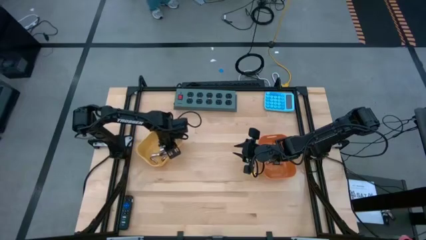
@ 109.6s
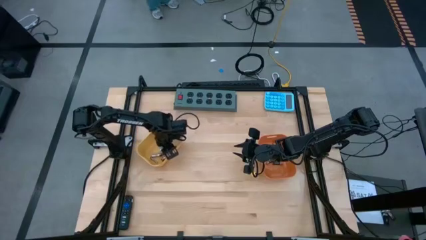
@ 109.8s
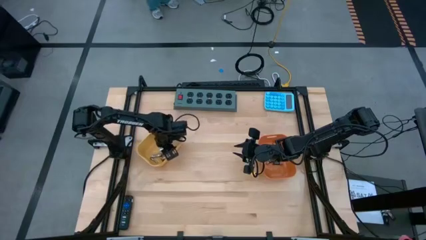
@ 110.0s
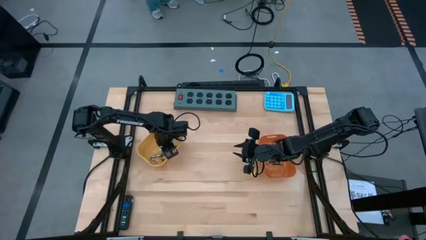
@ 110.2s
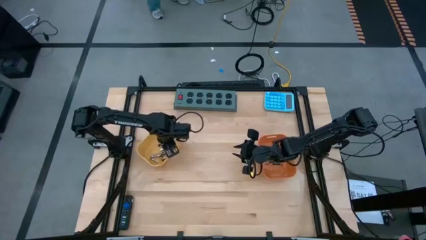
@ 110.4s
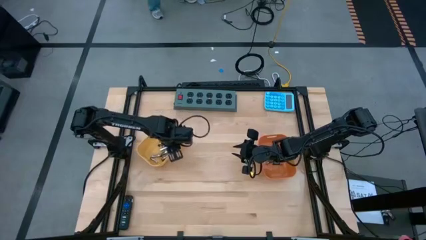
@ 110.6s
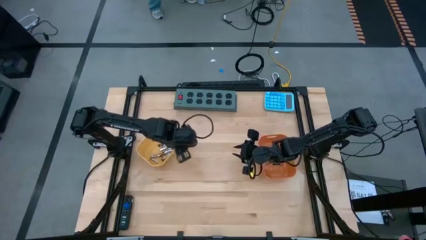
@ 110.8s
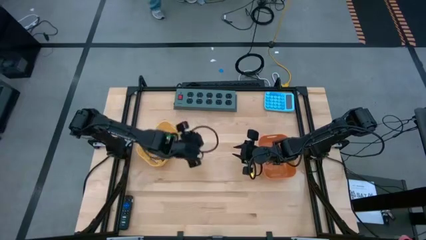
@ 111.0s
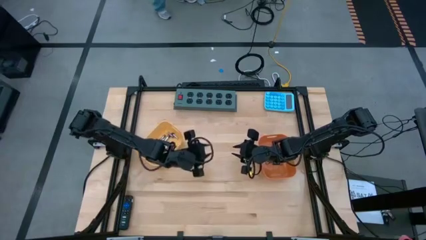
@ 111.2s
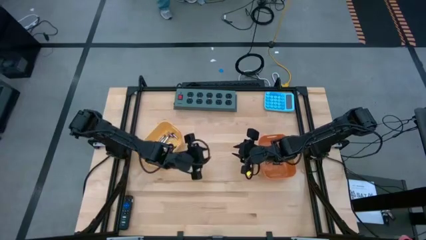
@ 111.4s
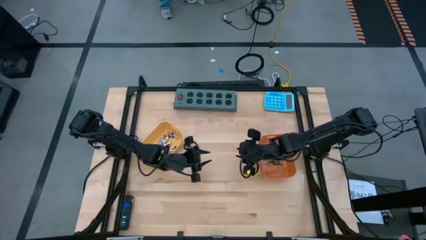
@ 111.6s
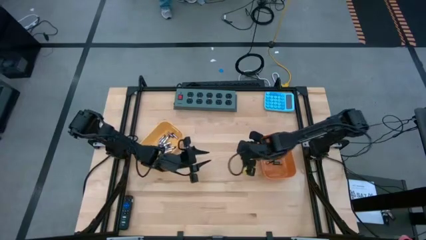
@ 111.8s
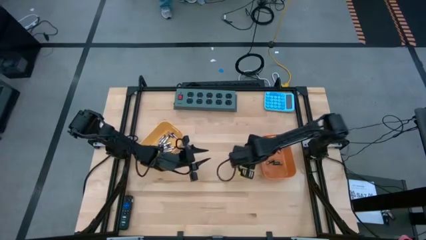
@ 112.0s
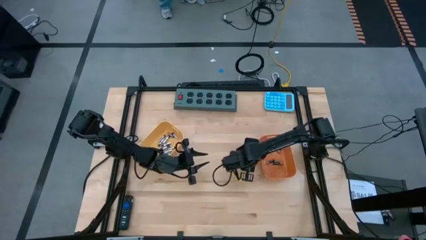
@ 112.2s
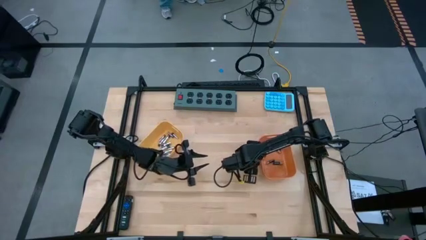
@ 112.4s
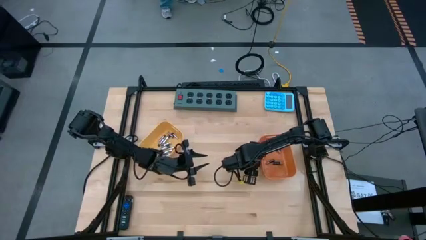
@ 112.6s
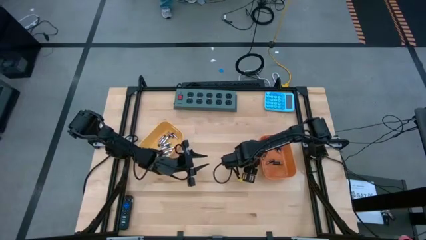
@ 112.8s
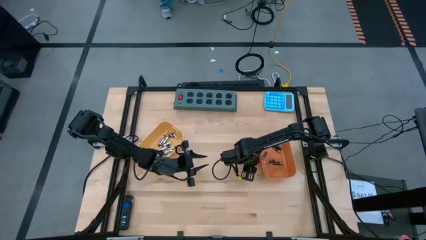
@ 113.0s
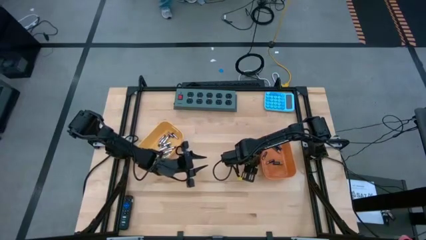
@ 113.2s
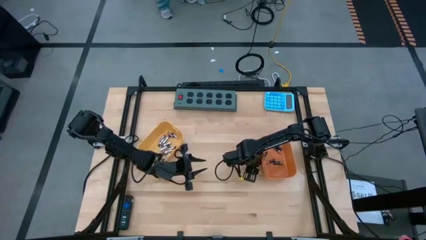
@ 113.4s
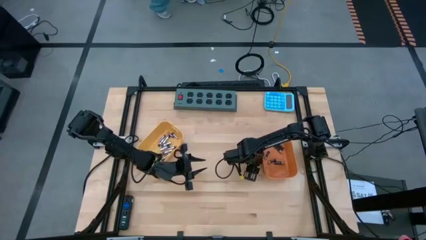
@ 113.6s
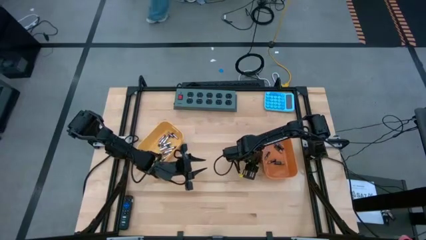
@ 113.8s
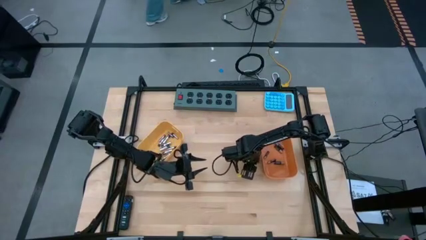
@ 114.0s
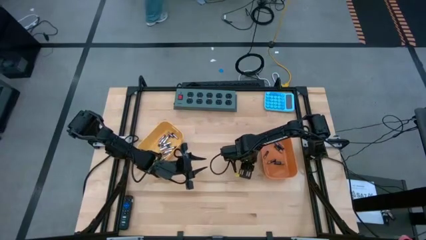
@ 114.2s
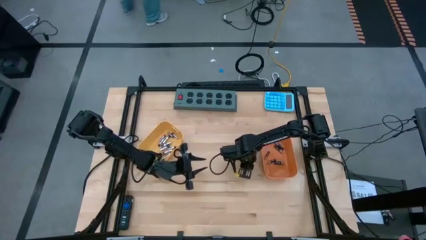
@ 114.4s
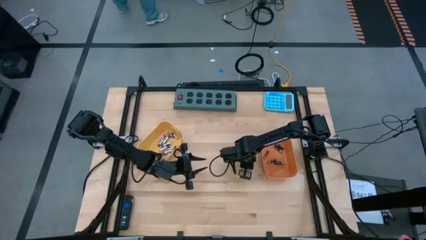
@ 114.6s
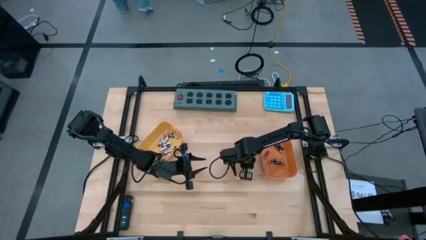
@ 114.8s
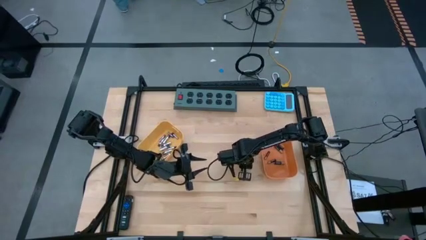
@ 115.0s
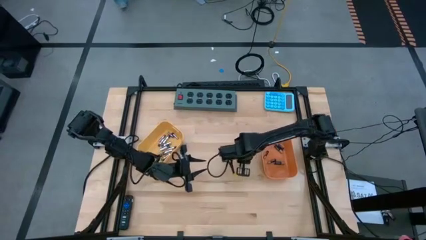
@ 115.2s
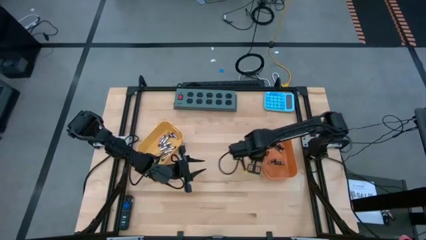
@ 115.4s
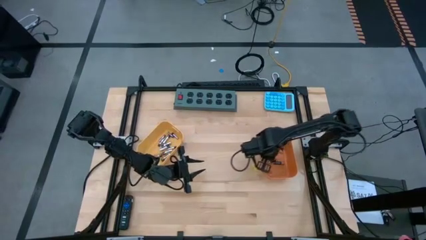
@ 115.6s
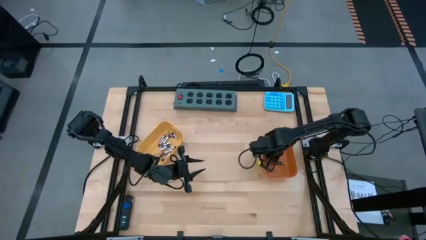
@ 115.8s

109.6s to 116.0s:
Task: Sort batteries
Put the black battery into the orange bin

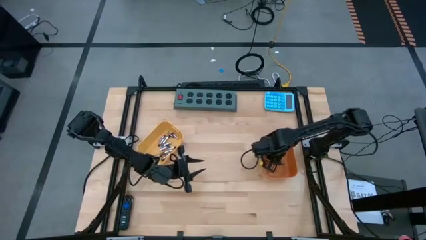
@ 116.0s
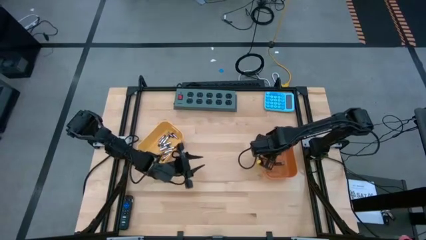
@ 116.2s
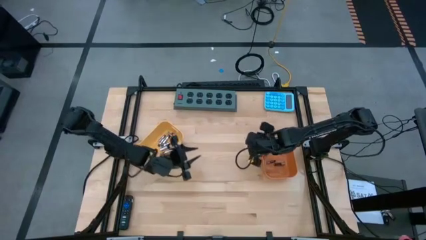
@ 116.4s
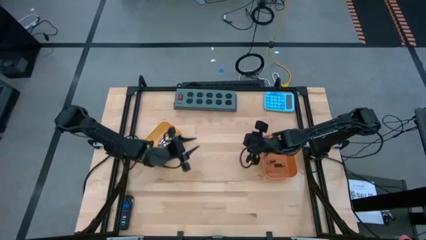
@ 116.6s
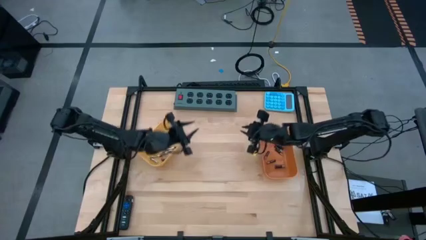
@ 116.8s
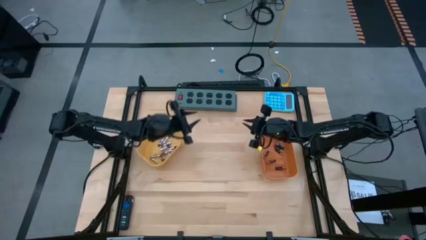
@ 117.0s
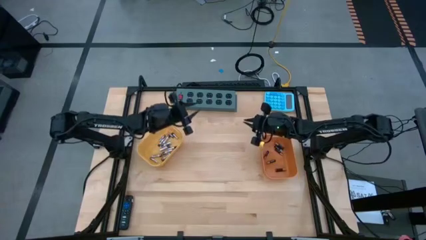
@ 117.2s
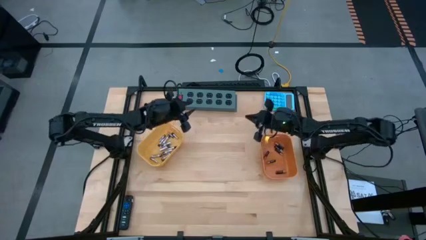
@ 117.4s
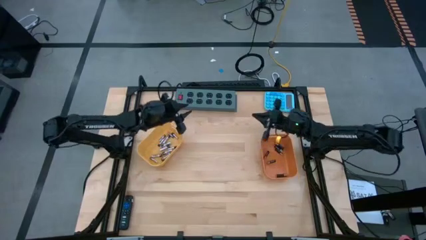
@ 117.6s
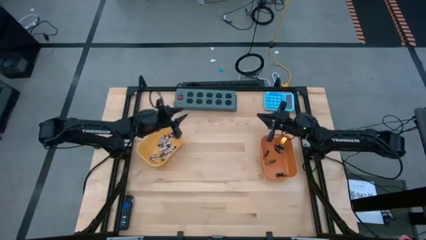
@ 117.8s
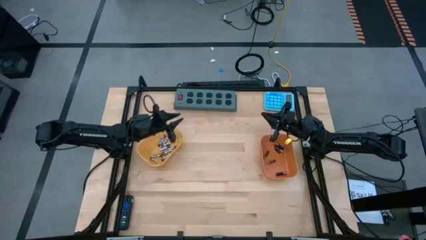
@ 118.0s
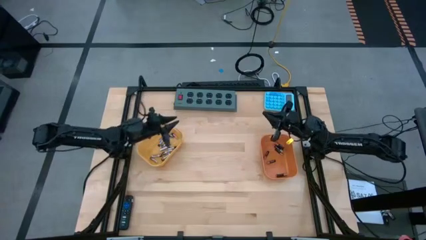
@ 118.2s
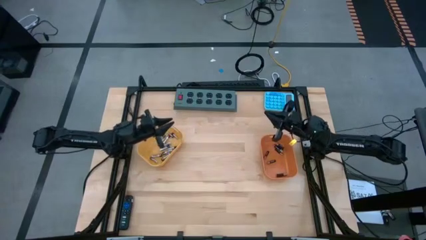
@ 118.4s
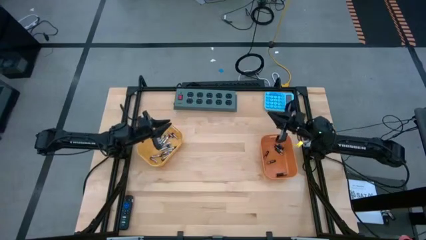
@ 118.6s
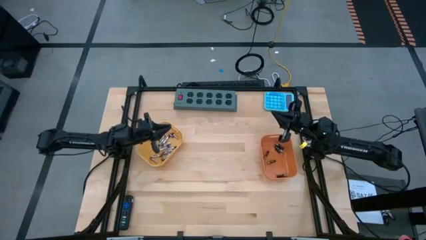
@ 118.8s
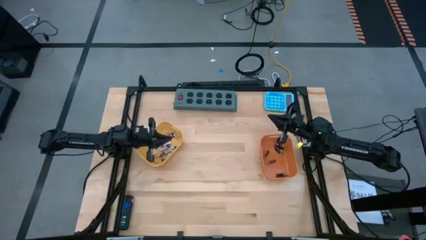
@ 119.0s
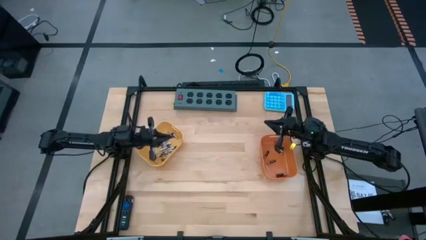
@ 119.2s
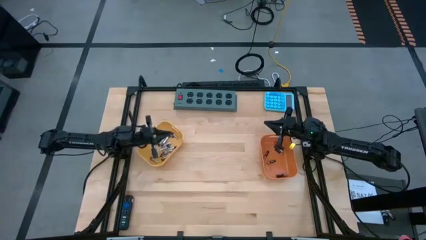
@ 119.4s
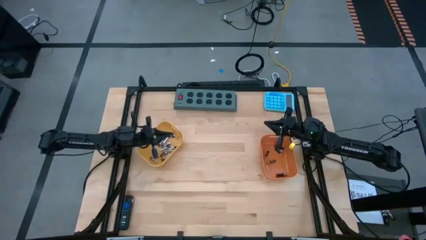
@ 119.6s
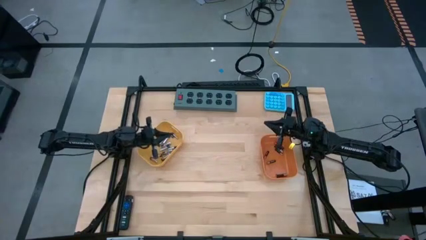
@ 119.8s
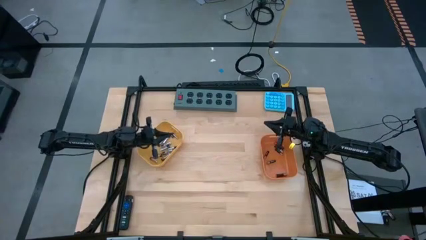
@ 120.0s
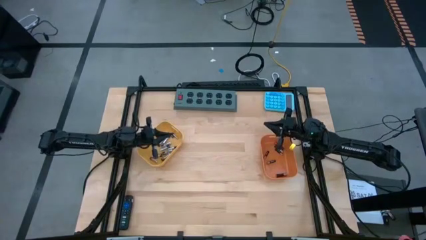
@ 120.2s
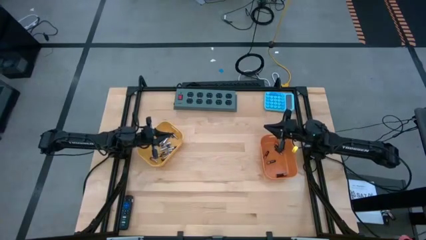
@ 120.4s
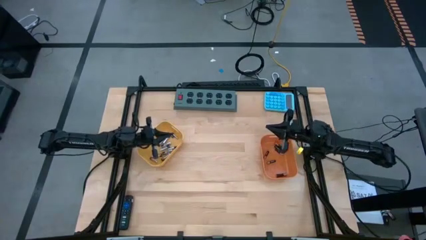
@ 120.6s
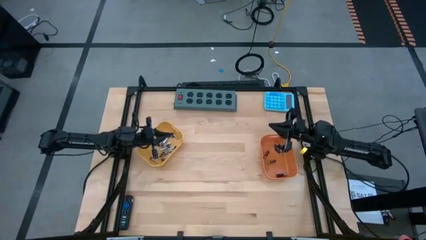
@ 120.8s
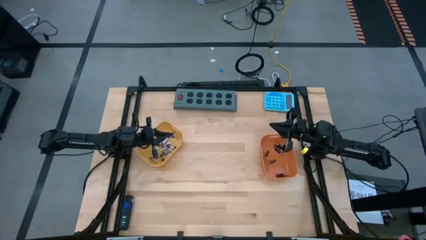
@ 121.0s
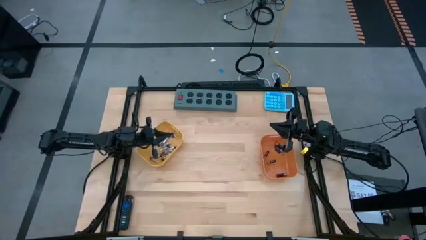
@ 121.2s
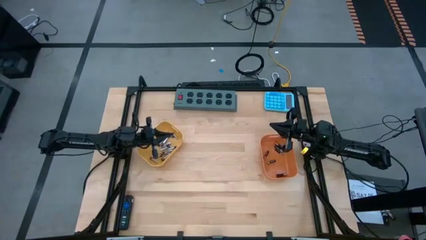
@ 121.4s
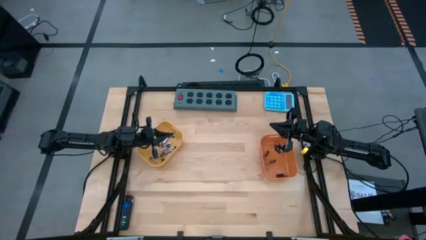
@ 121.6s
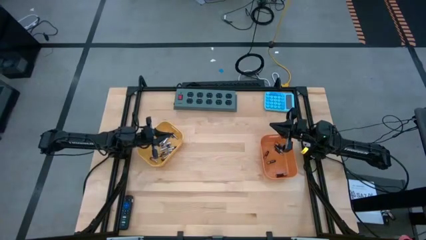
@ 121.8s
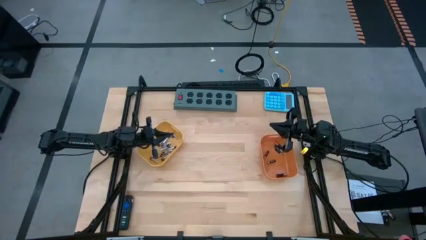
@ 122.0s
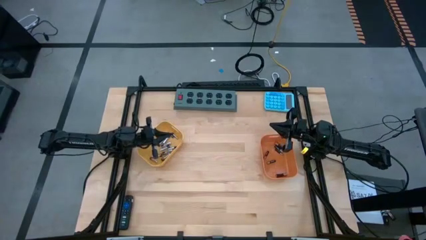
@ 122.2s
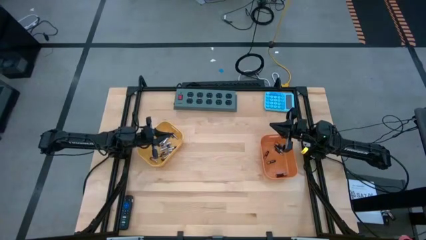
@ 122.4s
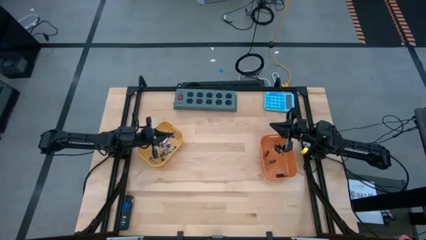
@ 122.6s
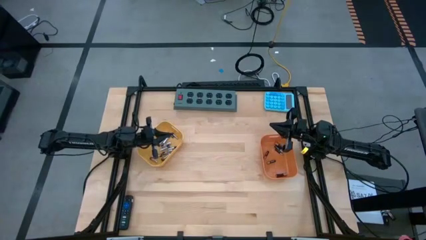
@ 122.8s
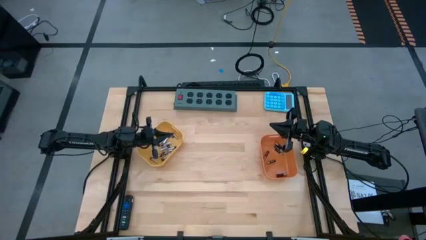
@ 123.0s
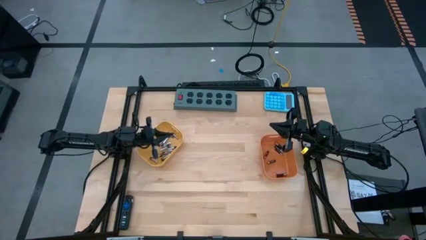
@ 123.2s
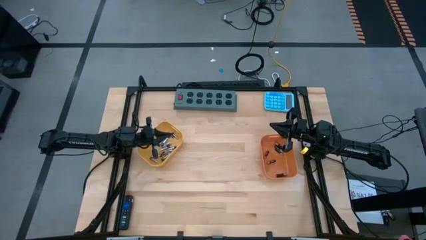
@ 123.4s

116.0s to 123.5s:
Return to Home Position

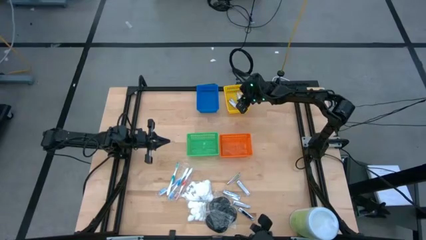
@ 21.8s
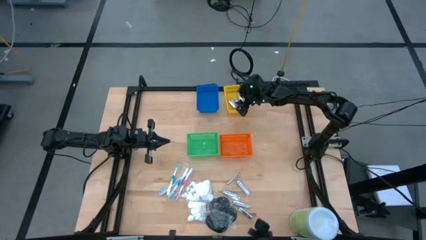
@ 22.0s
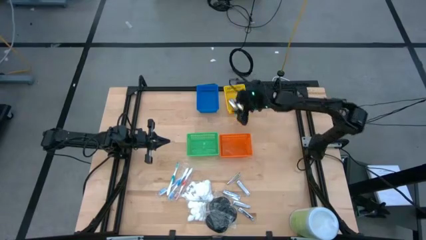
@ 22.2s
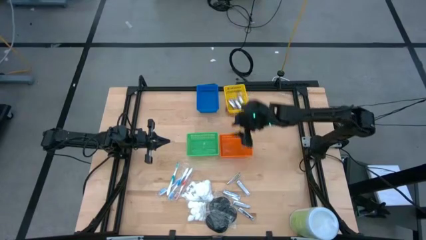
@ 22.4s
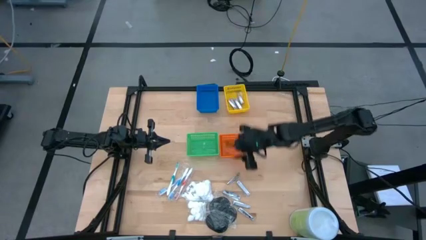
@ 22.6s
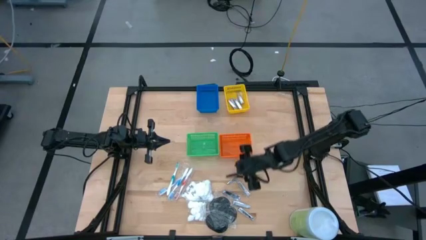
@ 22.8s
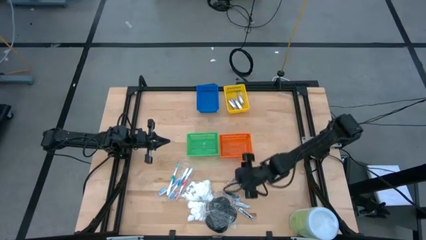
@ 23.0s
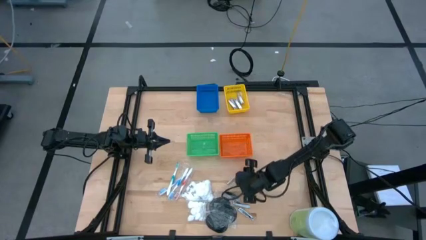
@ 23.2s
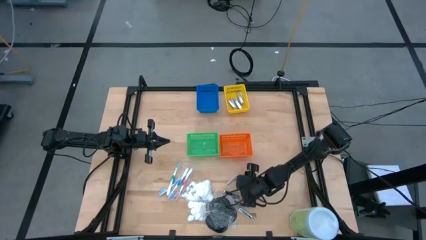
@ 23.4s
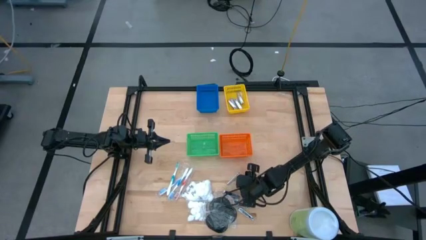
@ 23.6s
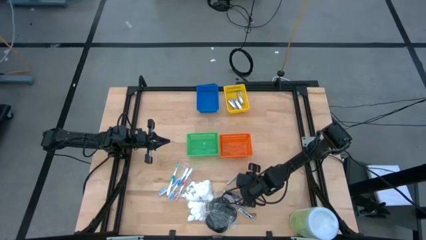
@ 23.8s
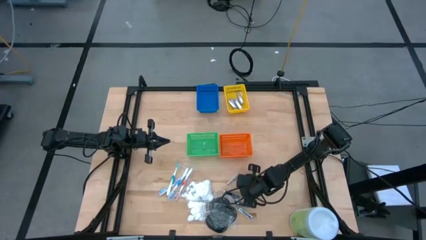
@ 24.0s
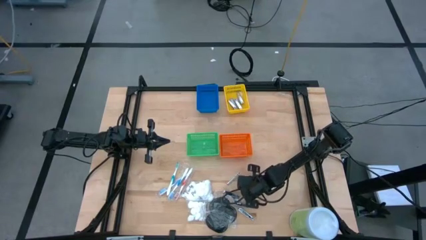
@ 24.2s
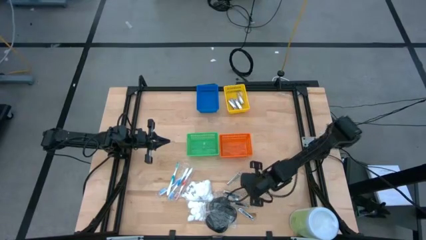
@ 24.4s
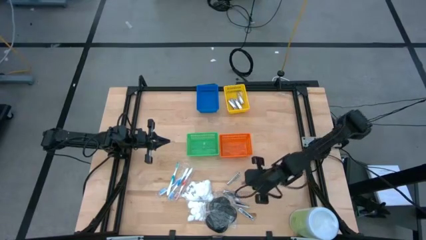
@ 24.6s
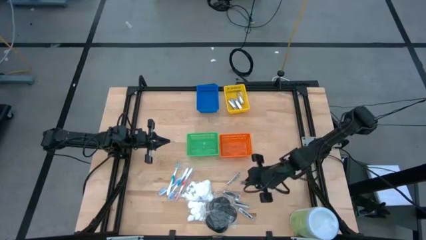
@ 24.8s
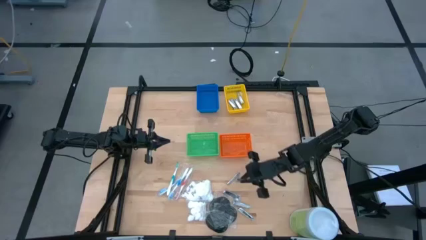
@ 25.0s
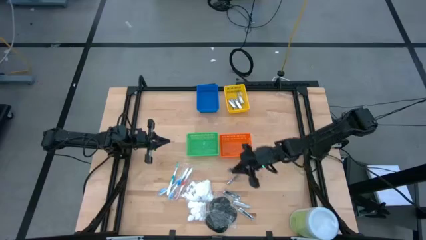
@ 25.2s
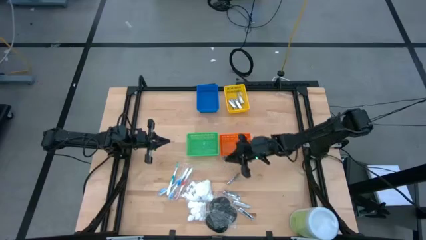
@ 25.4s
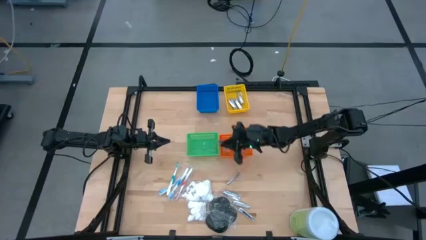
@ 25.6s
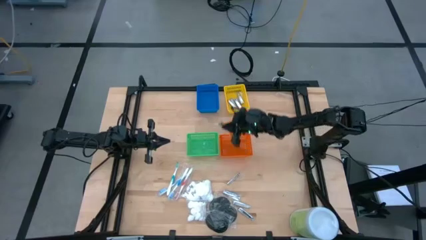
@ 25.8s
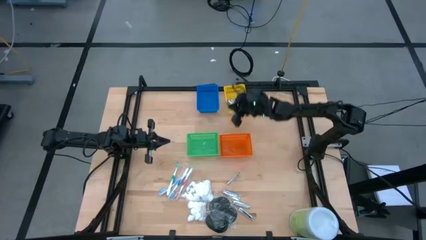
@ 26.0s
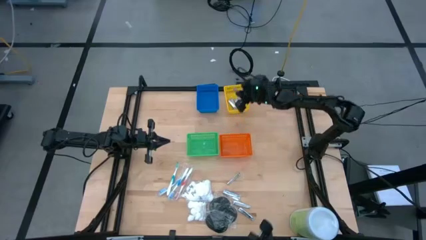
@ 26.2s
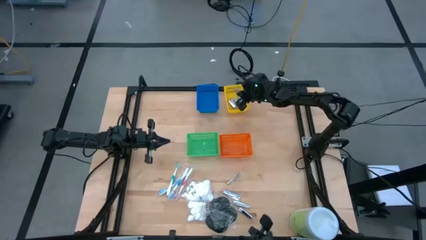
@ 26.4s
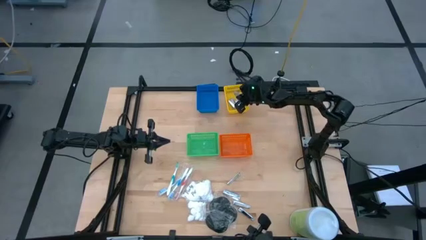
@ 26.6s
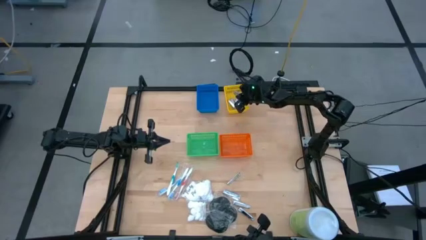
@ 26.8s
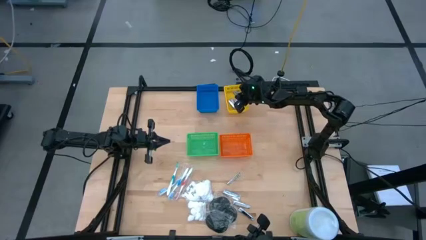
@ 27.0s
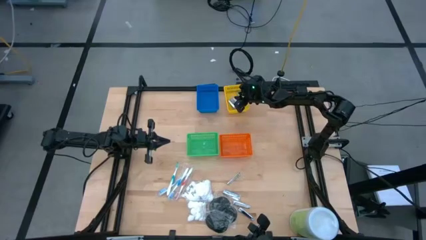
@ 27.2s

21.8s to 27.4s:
Task: Pick & Place Travel size toiletries
Put the nail cutter into the yellow bin
